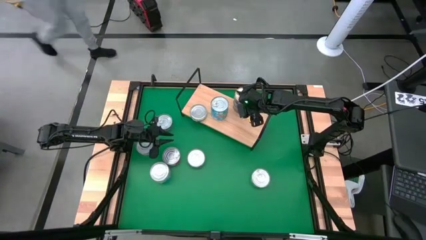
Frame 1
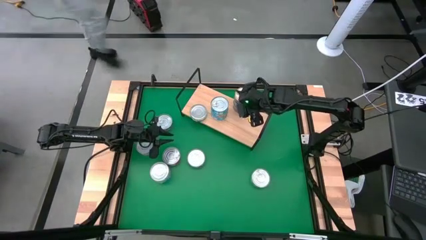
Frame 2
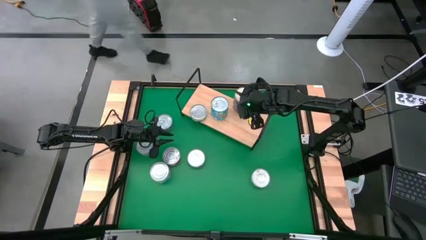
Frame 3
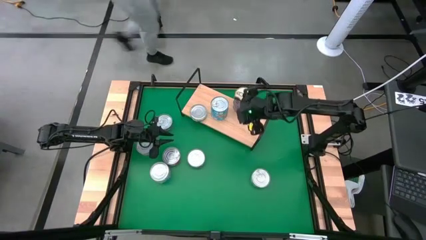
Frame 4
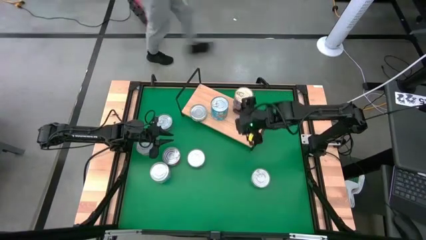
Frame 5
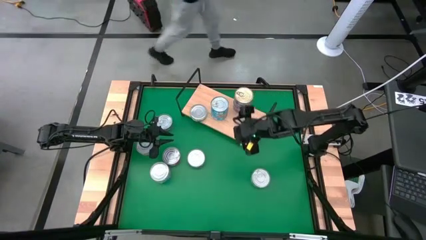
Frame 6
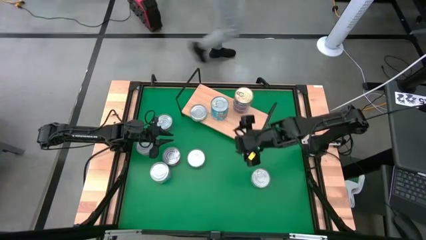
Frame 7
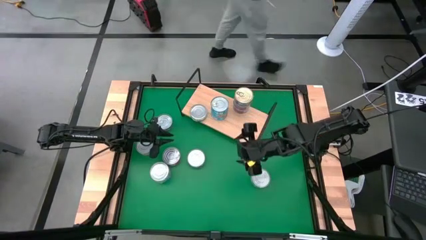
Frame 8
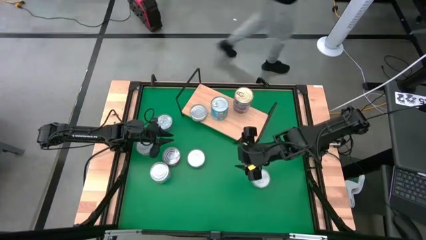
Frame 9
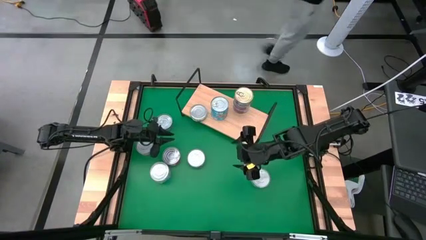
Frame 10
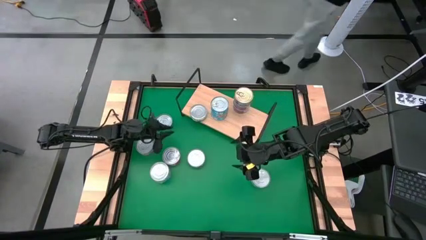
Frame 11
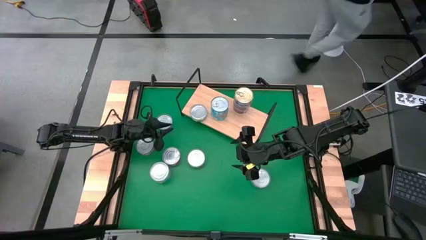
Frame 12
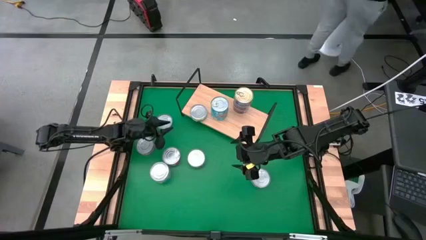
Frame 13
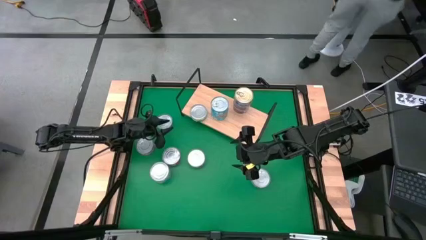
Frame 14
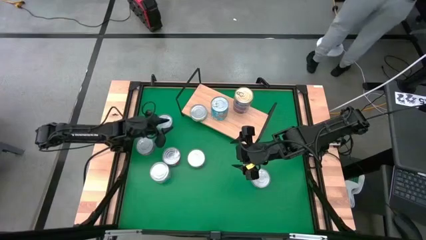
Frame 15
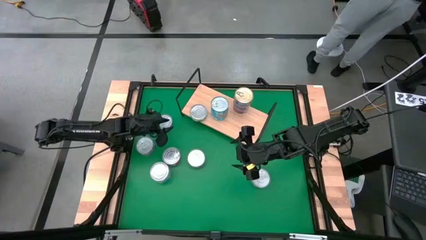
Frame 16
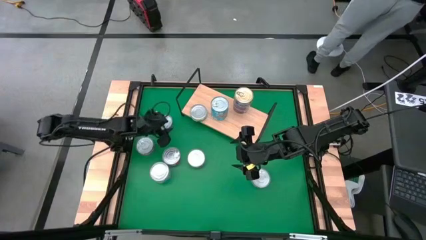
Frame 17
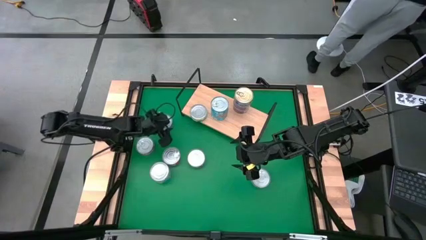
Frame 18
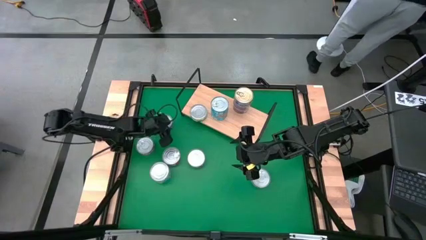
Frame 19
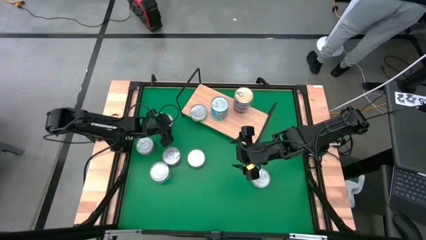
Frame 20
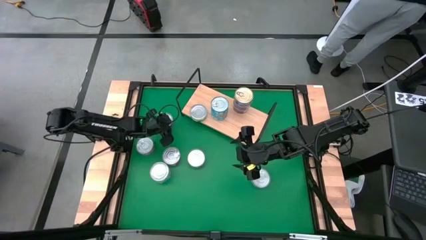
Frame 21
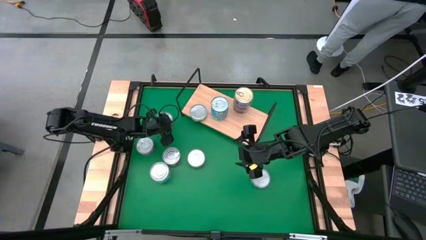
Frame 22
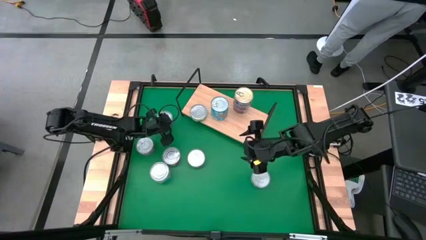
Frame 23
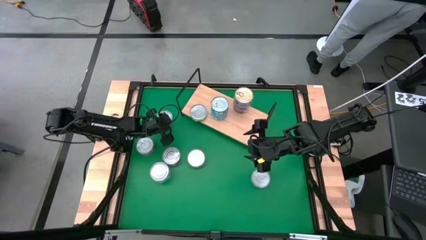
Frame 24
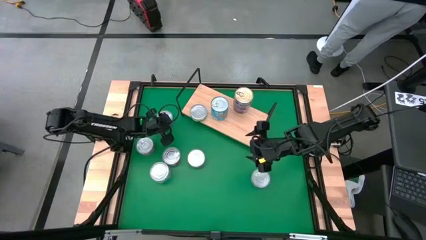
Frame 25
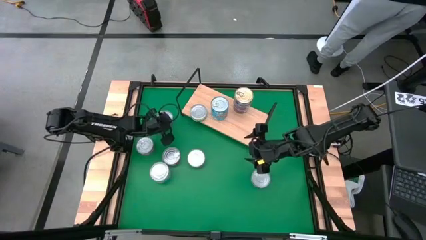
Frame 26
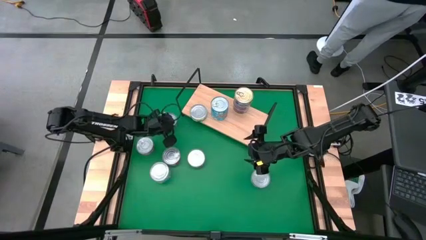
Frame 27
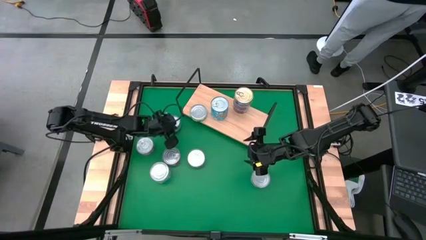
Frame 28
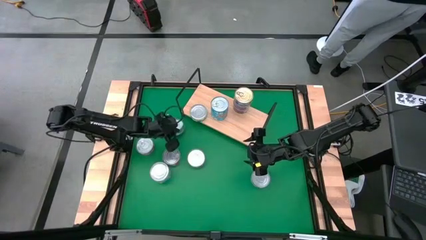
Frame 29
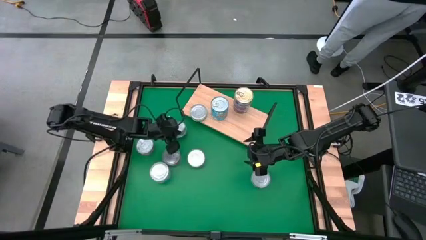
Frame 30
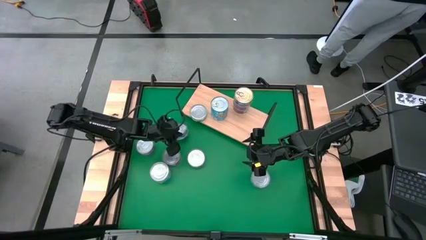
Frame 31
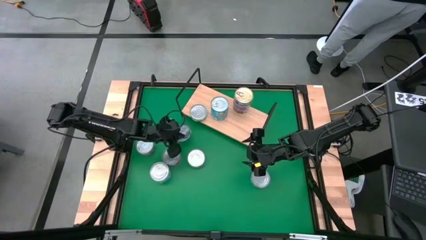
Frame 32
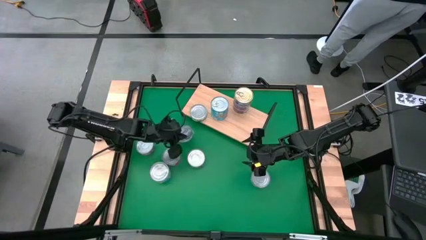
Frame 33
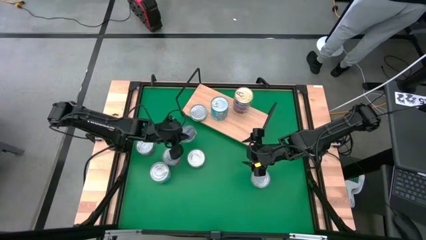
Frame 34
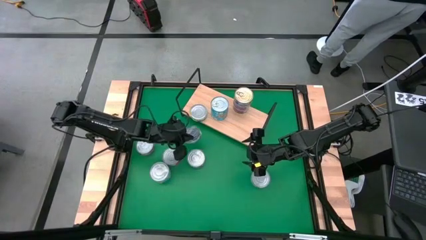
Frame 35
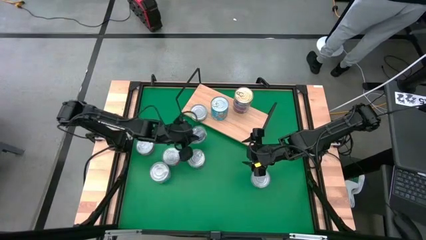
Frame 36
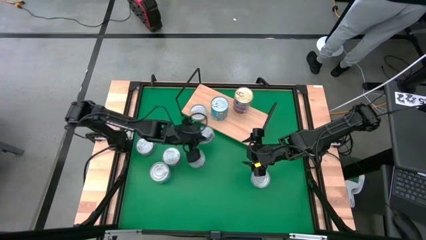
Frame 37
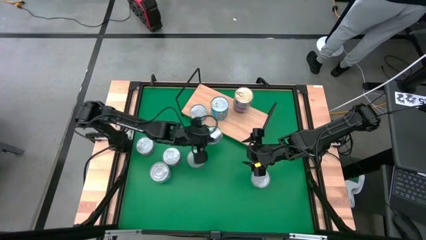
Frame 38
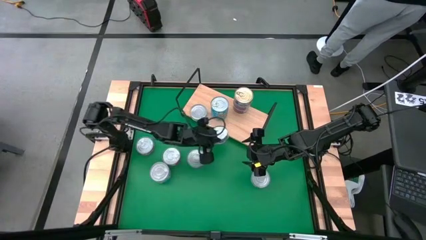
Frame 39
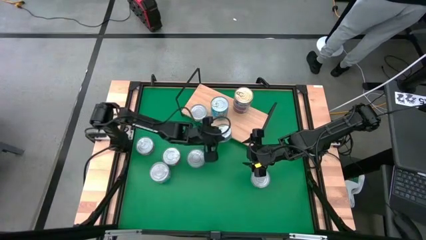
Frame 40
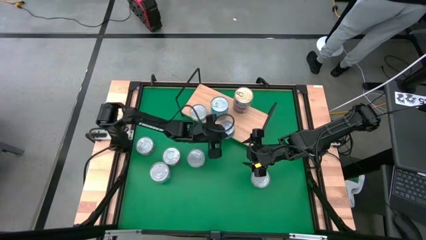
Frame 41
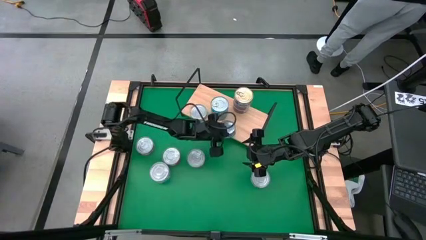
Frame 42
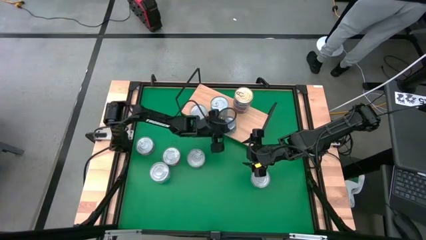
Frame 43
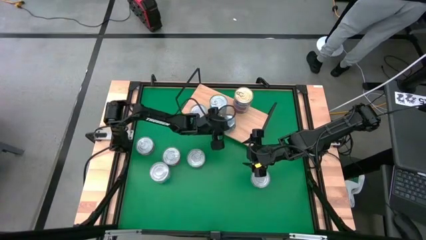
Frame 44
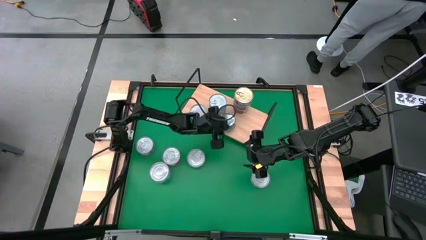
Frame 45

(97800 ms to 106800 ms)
Task: Stack canned seafood by type on shelf
Put the green tuna can on the shelf

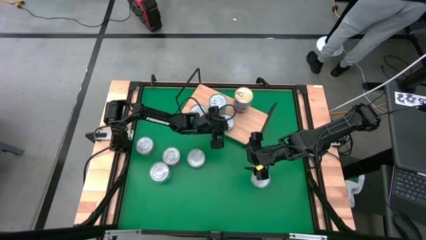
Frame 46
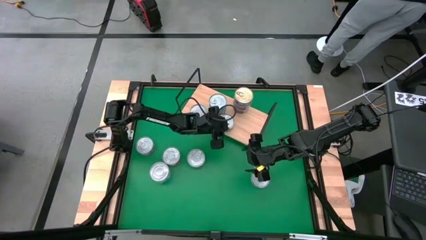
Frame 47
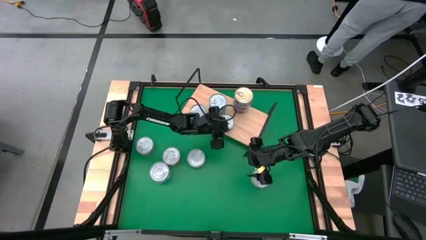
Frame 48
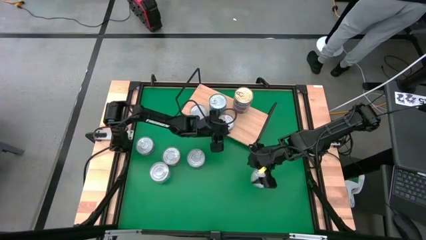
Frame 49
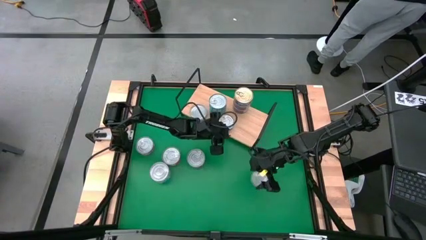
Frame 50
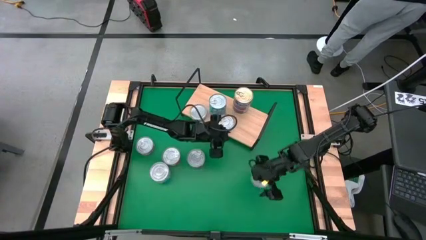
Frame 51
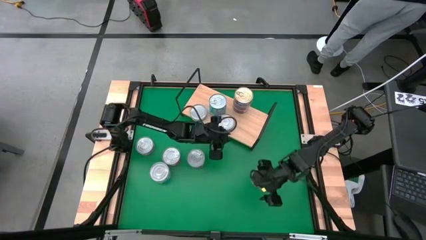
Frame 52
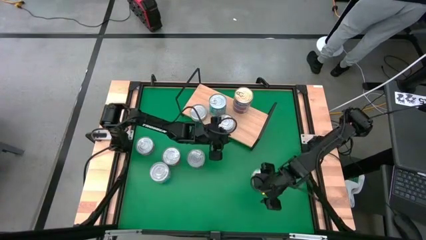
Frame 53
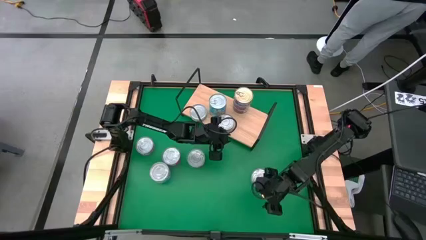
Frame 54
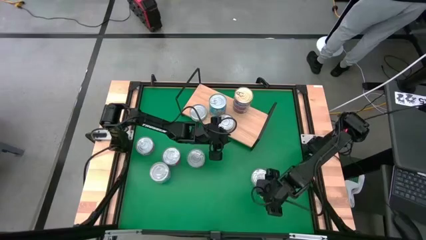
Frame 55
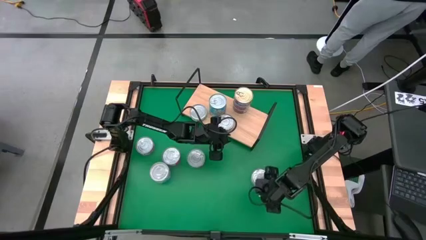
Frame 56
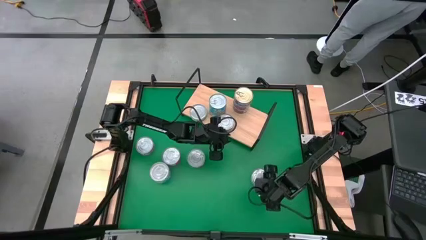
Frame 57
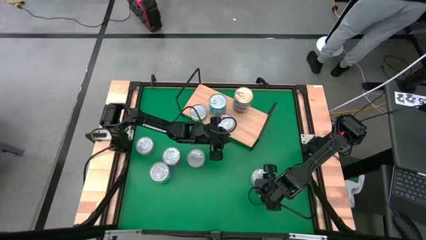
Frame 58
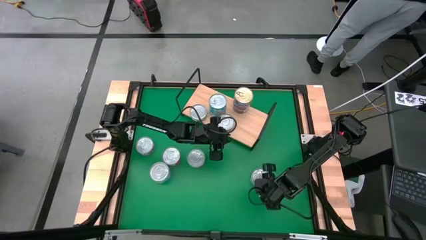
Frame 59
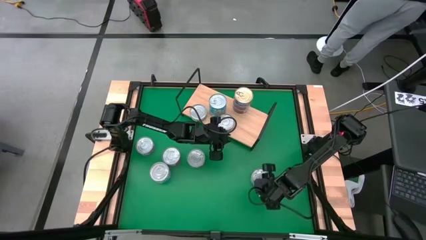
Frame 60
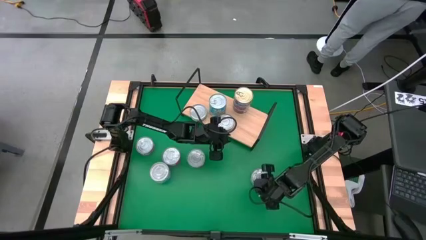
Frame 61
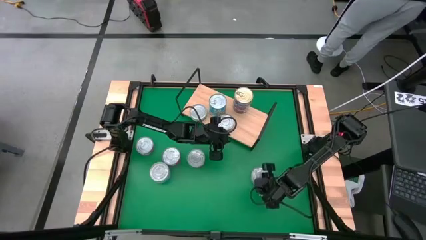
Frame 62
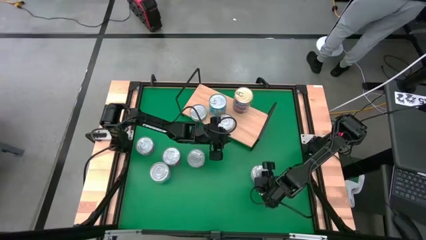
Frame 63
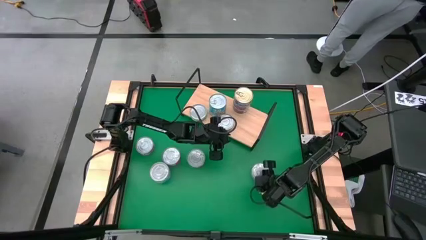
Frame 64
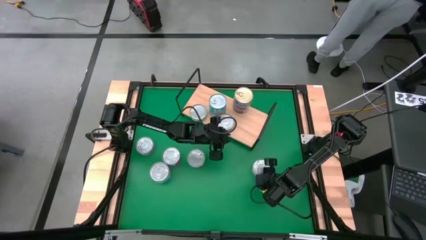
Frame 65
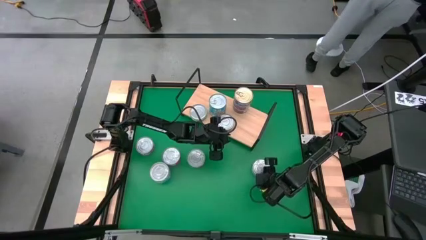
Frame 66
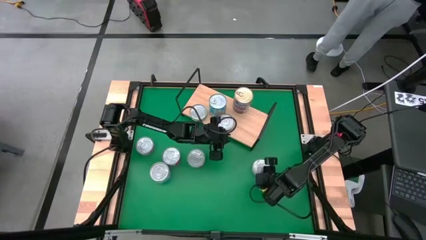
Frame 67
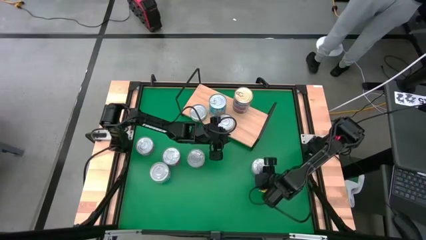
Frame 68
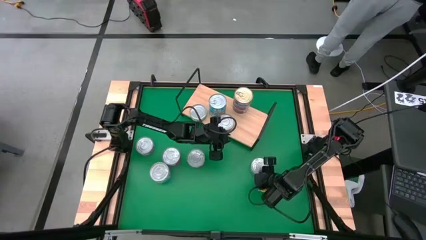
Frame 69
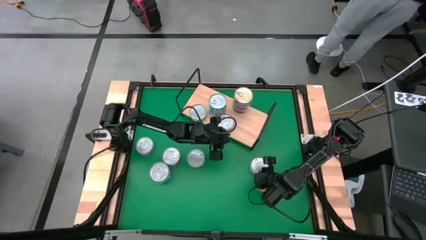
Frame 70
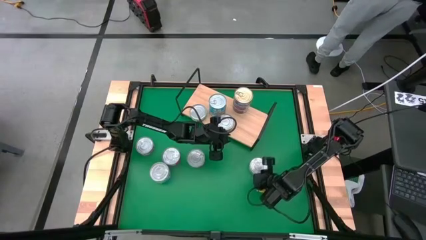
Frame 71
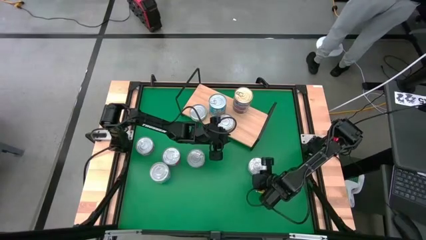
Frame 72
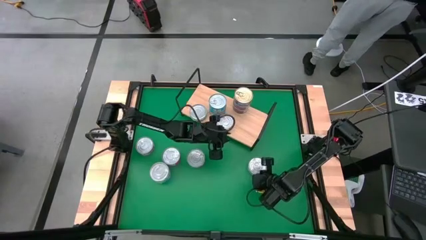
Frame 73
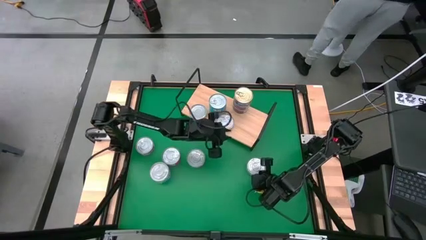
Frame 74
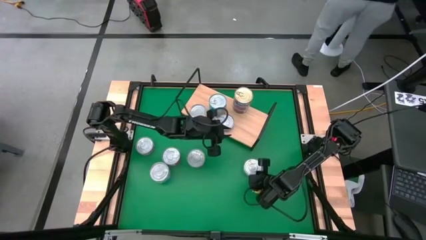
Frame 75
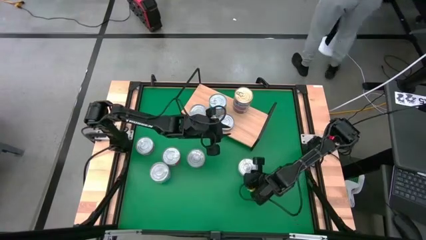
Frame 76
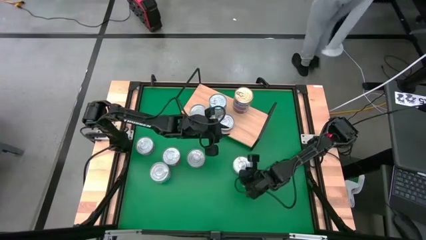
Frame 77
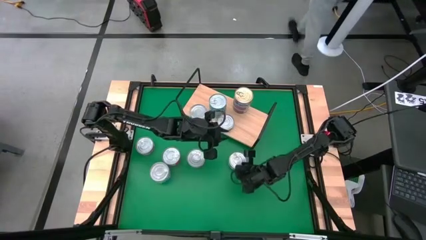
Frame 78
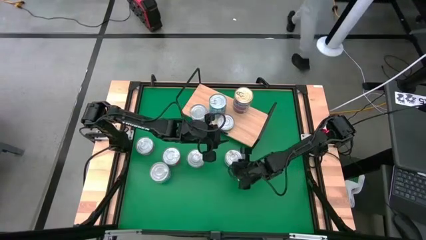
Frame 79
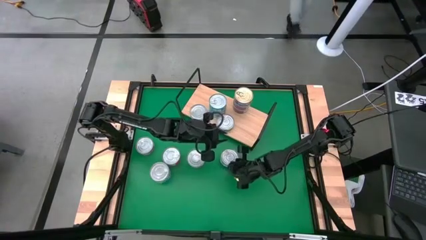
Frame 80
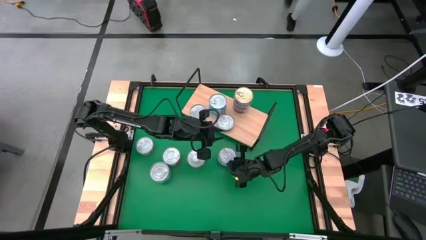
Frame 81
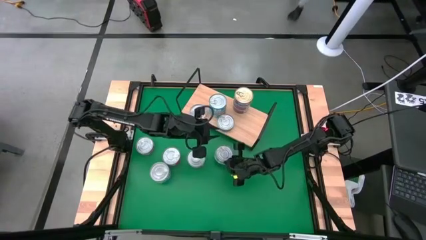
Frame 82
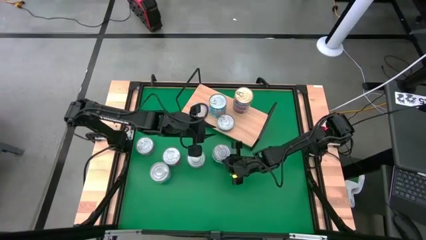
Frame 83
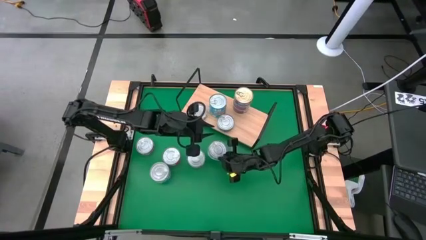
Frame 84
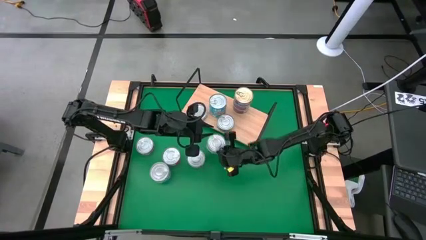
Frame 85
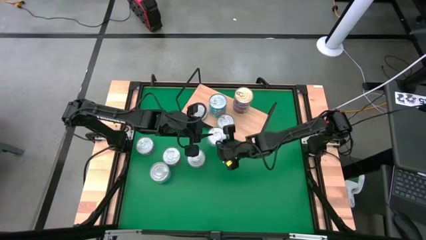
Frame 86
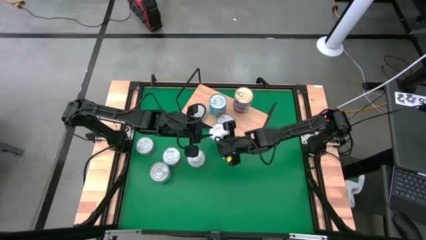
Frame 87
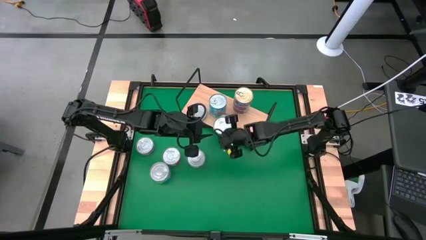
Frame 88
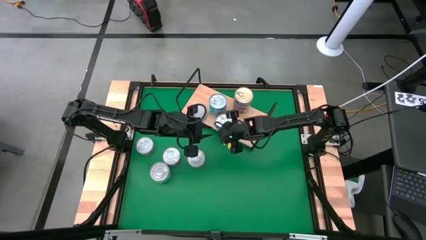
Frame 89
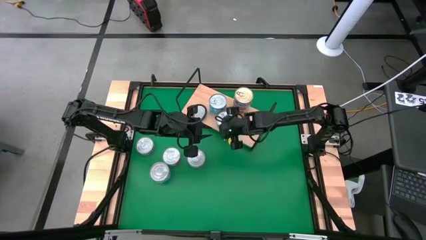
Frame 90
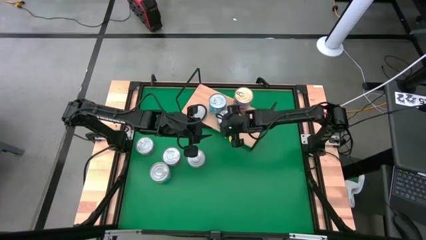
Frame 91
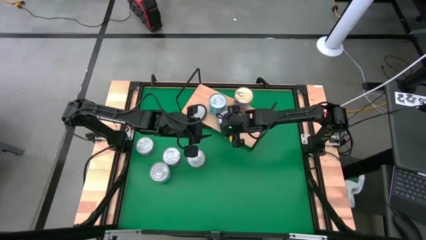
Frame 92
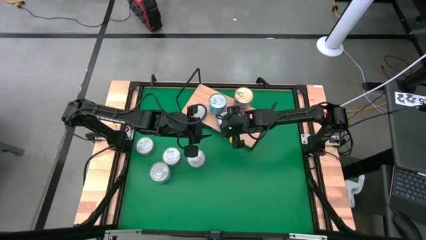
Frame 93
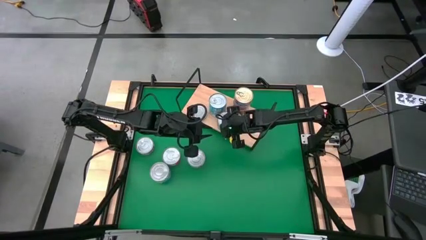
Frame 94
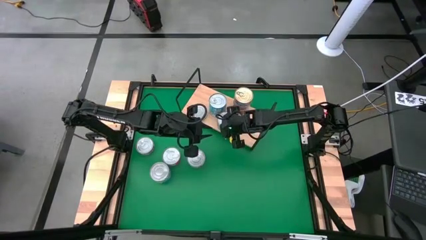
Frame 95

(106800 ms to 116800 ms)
Stack the green tuna can on top of the green tuna can on the shelf
